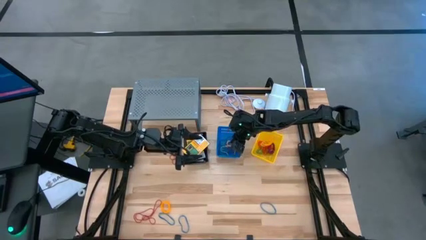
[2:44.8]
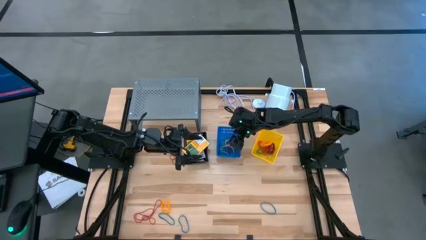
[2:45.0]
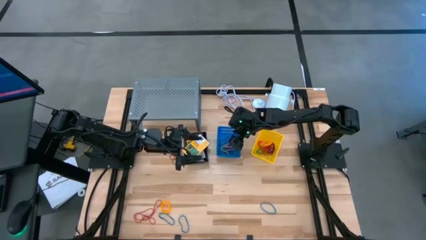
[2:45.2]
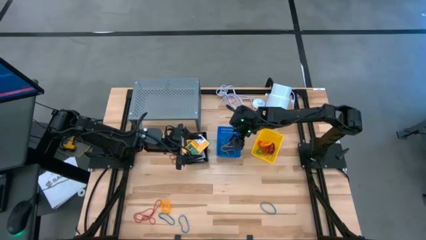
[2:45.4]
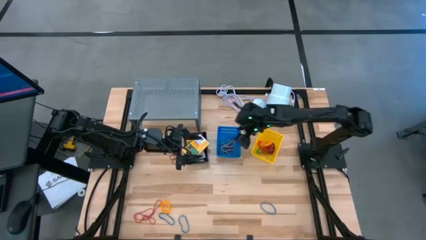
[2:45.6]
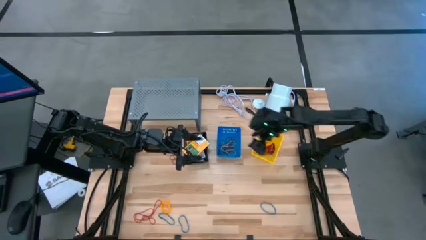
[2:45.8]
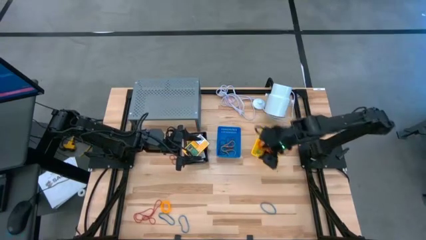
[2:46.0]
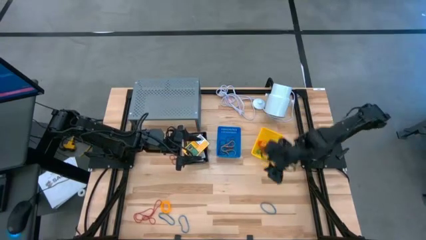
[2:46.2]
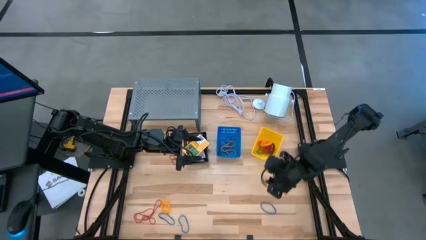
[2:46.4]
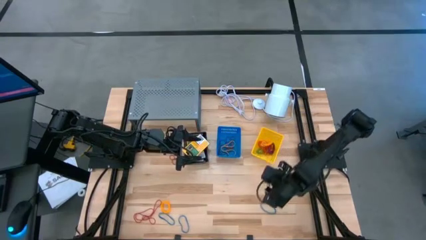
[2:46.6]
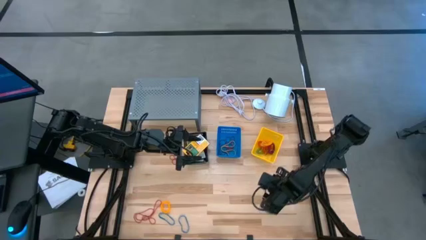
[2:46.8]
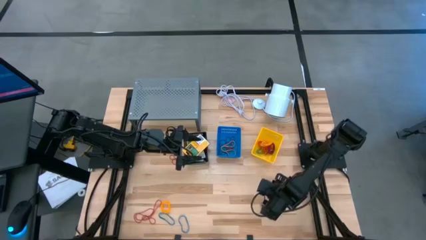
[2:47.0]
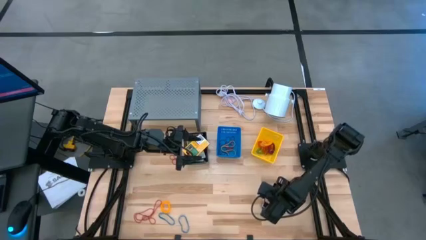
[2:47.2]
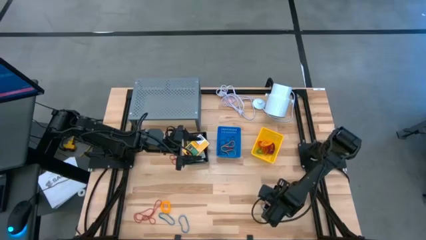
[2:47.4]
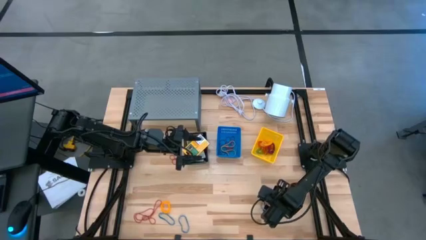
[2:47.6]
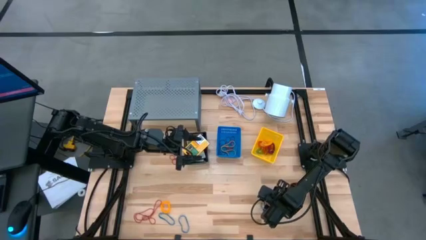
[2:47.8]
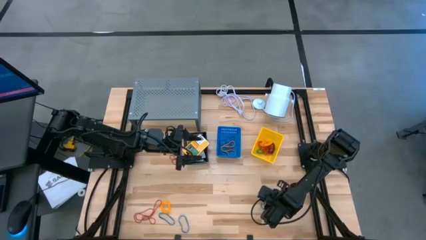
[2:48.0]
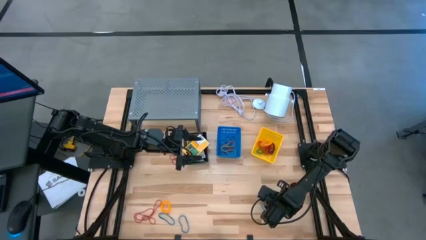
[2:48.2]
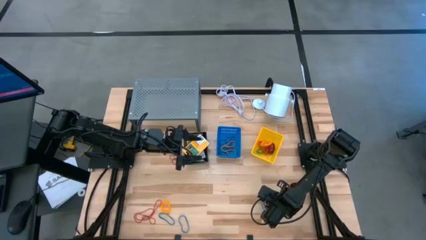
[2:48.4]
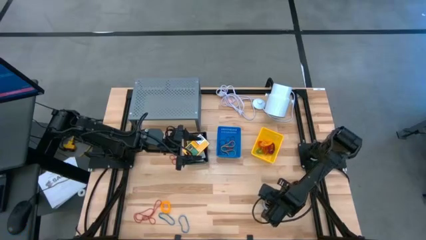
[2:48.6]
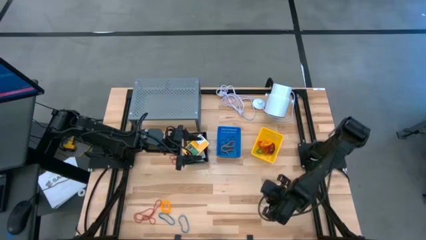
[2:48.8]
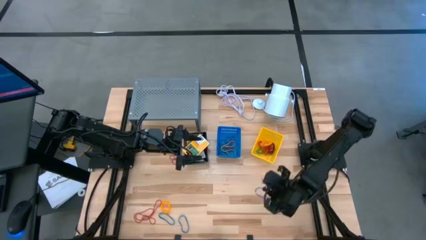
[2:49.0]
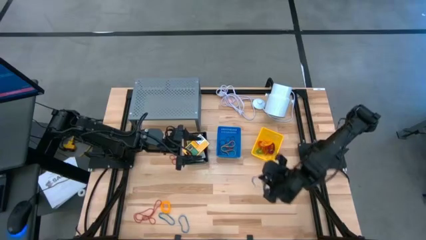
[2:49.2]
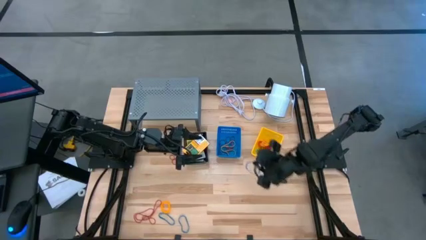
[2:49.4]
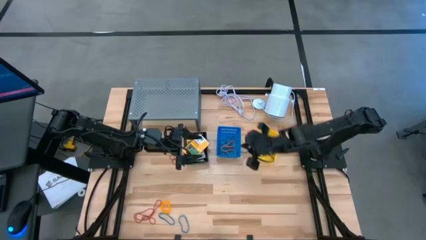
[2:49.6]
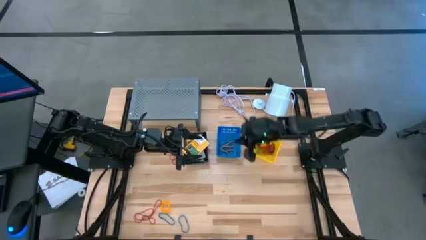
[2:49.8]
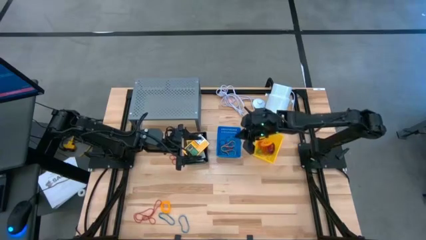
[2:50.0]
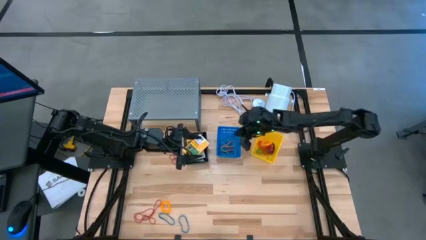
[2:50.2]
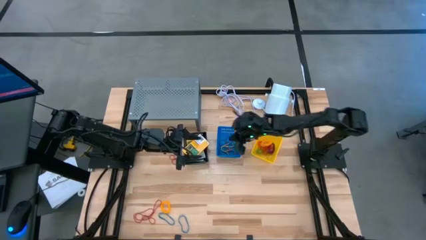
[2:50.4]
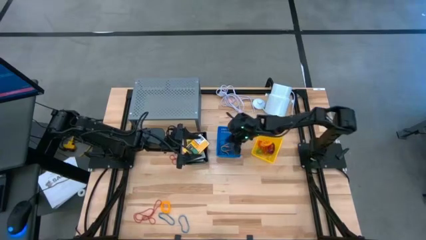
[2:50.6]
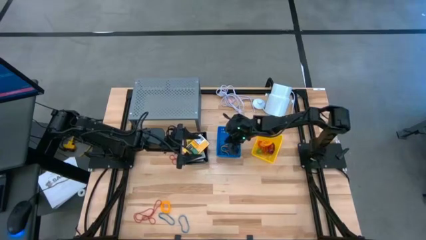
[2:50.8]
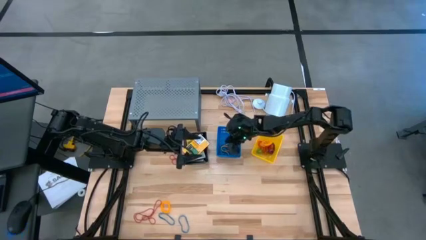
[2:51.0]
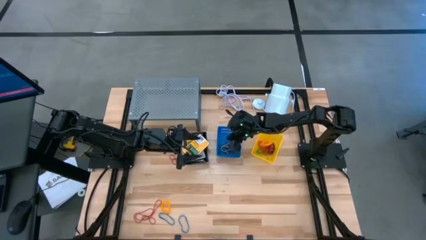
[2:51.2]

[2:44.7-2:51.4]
Task: Pick & Place Office Desk Supplies
Put the blue rubber band into the blue basket

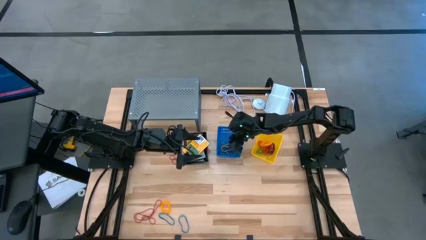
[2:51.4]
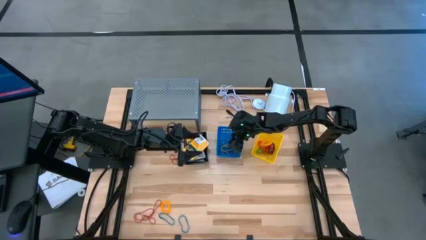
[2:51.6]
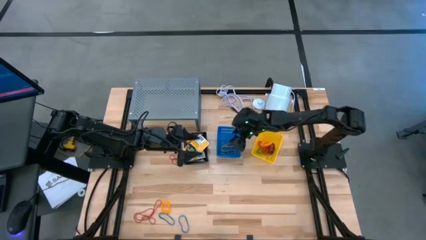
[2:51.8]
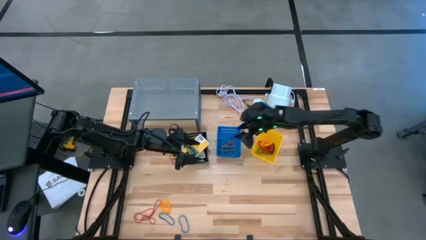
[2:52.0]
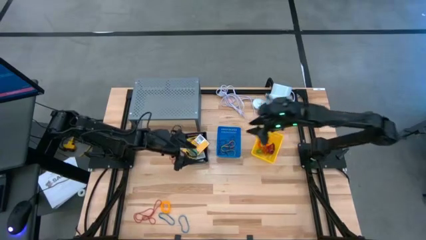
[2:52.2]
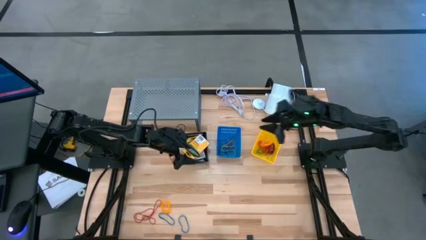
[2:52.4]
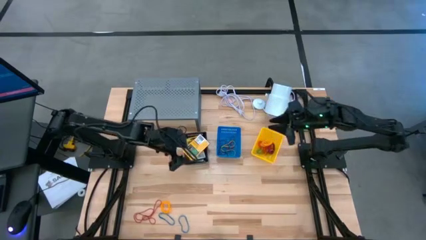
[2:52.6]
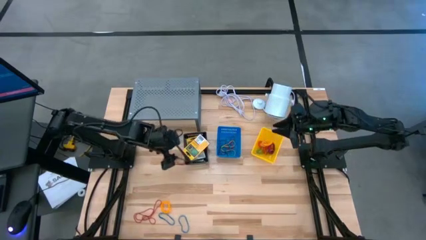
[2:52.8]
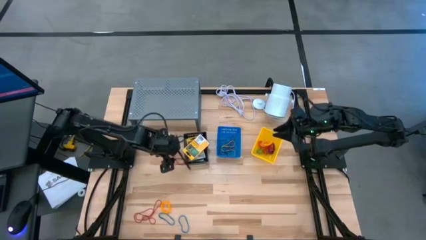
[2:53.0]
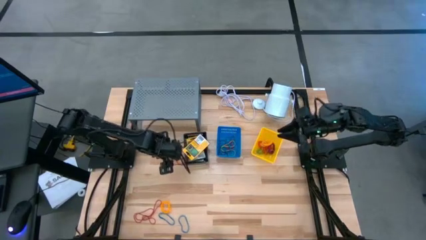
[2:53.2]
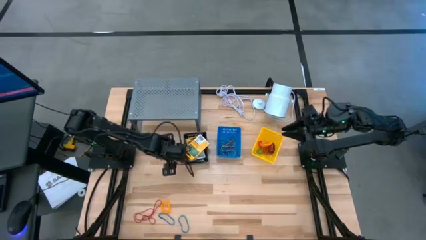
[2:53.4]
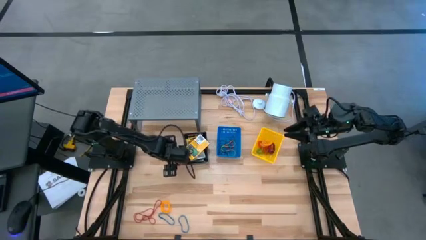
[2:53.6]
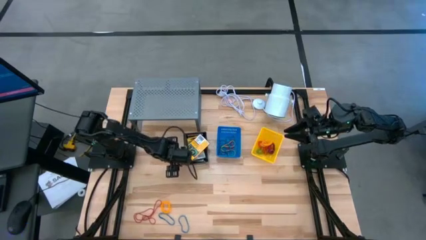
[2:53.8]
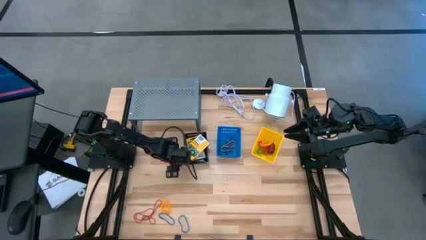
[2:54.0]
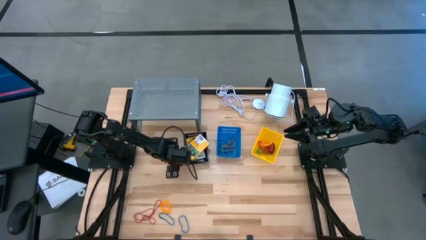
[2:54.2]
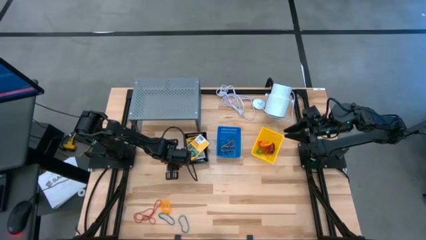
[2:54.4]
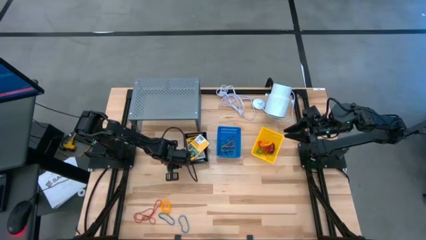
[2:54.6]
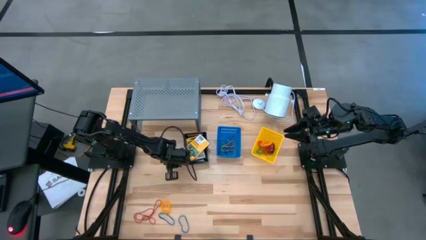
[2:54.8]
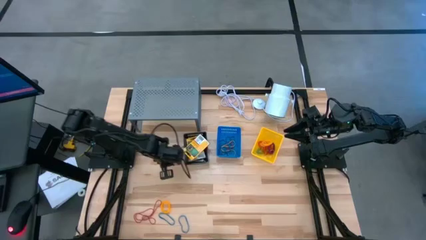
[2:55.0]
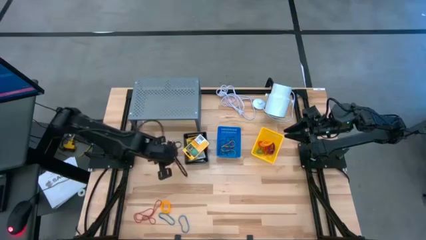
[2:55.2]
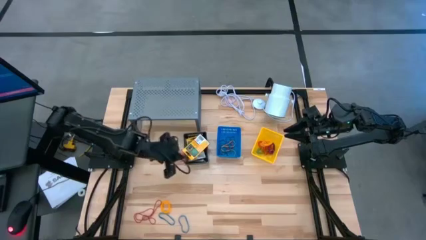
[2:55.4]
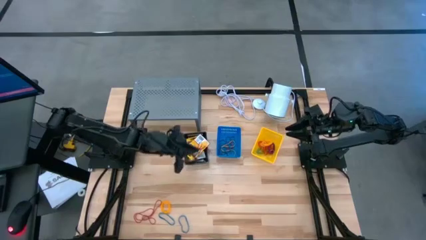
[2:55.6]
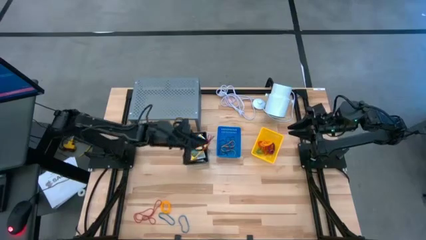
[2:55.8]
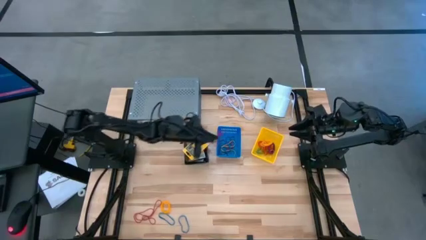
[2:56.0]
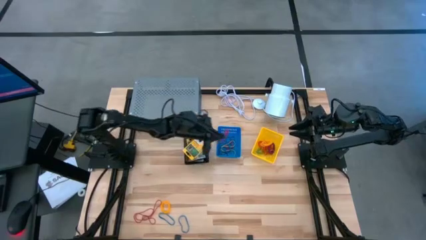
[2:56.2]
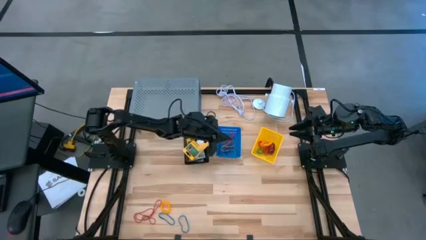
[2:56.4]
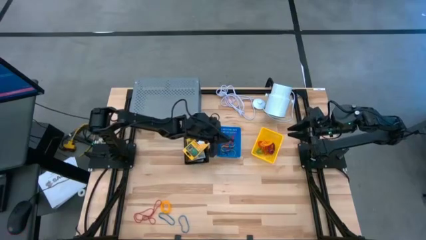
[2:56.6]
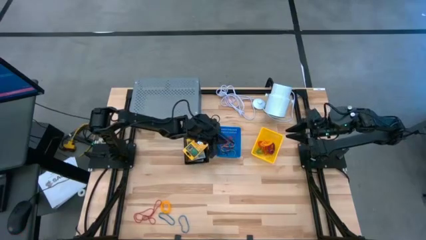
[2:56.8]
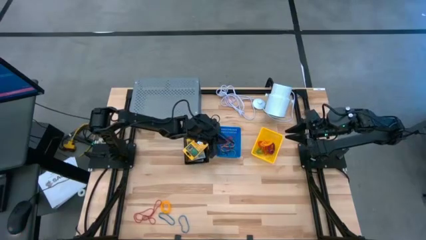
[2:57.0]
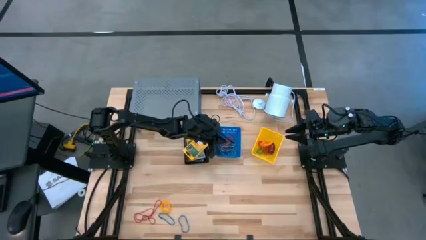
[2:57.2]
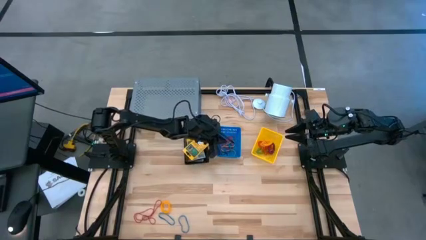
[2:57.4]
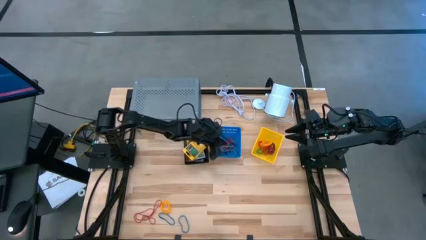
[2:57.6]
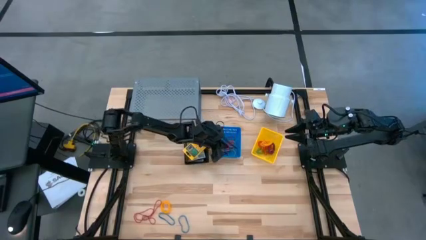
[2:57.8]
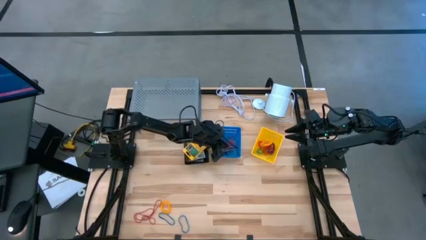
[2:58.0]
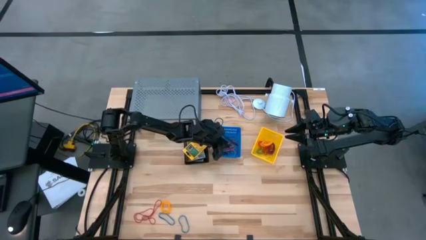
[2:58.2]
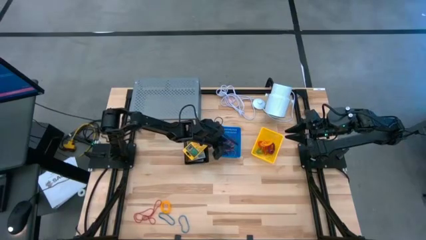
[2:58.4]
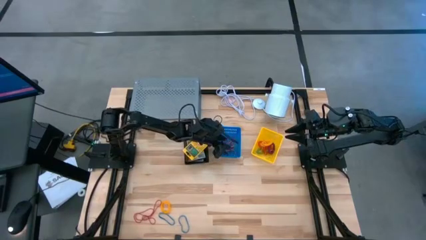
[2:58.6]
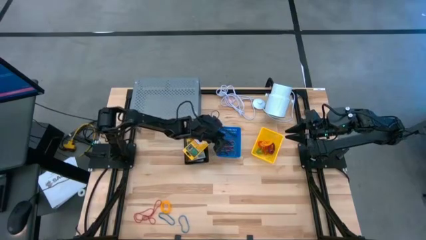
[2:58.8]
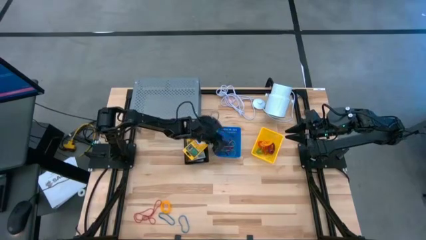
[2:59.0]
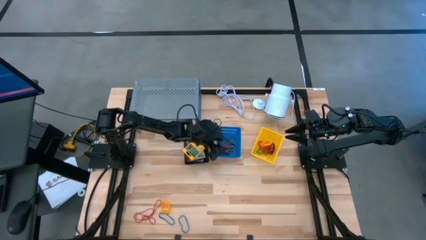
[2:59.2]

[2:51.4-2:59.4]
Put the red rubber band into the blue basket
